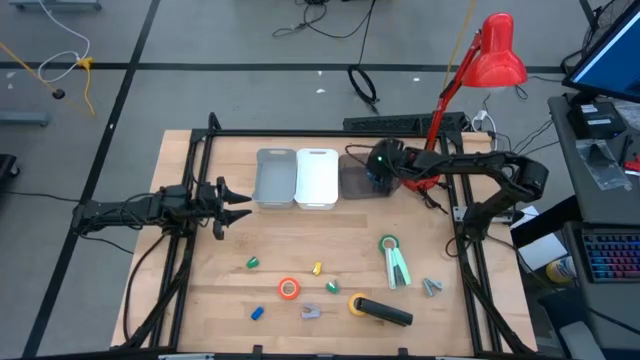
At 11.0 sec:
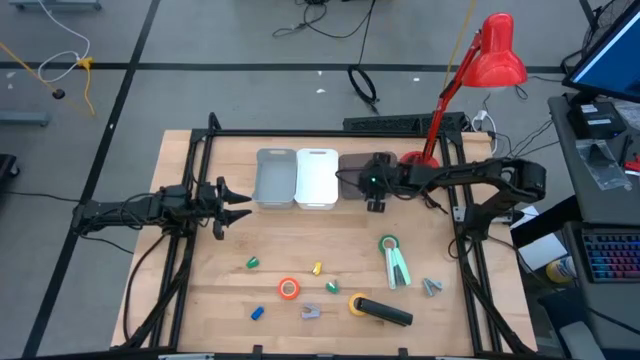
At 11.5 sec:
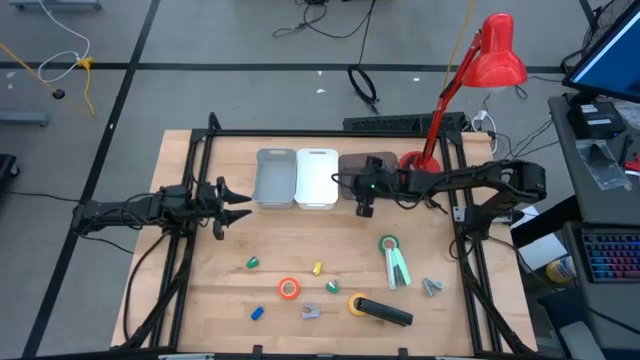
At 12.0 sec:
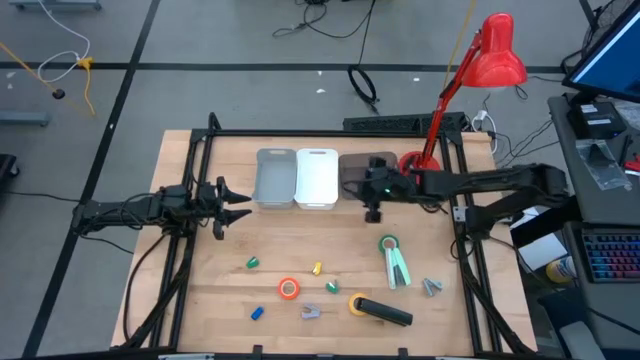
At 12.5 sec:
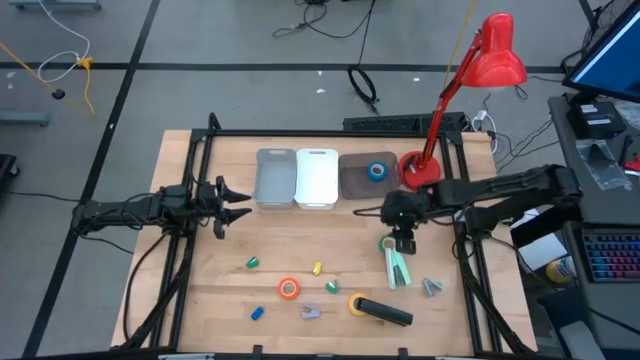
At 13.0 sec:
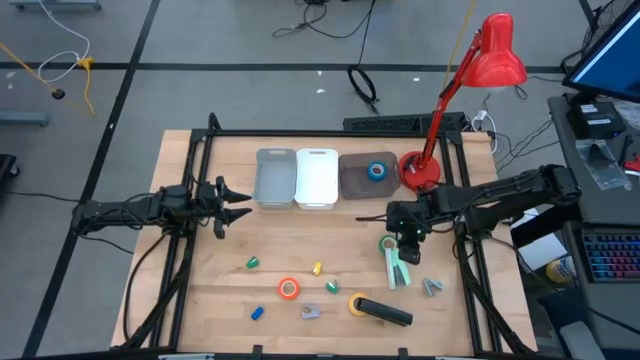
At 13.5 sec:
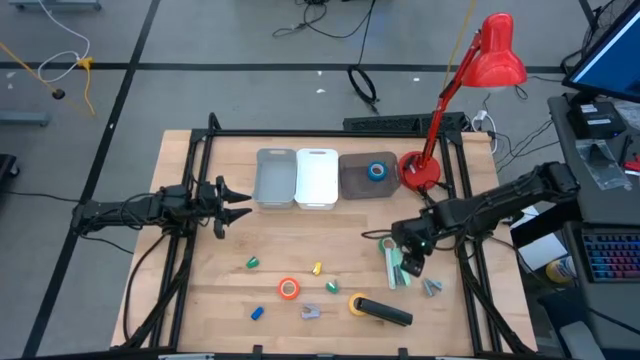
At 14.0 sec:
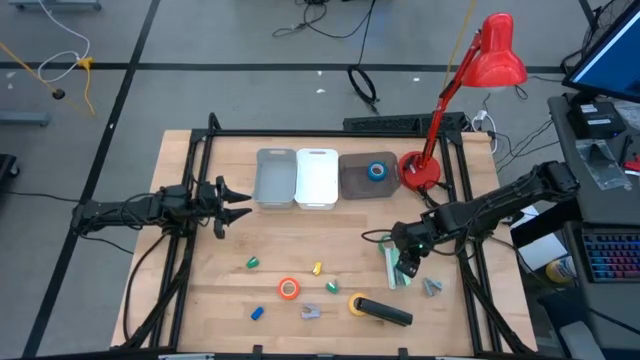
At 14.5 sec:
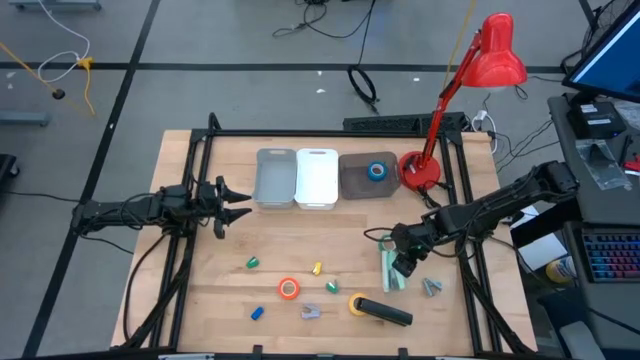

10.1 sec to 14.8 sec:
Task: Pick and place Stapler, Stapler remover, tape
Adjust the blue stapler on the table

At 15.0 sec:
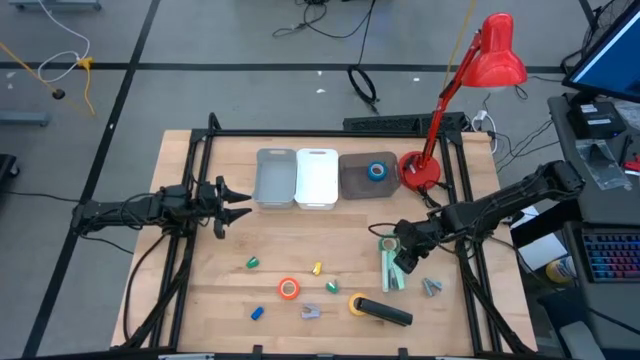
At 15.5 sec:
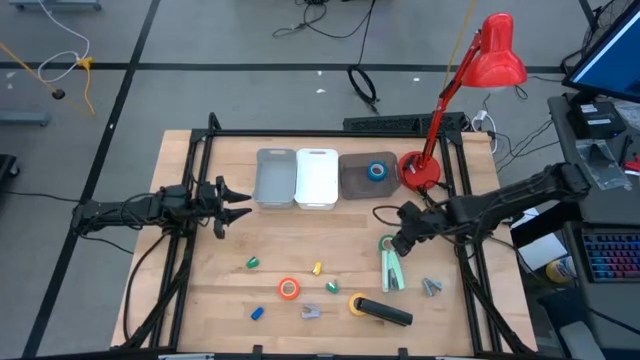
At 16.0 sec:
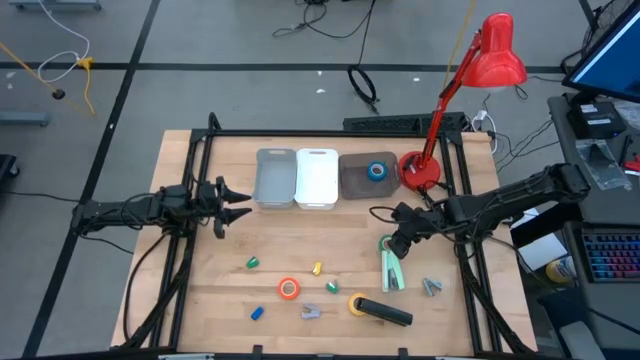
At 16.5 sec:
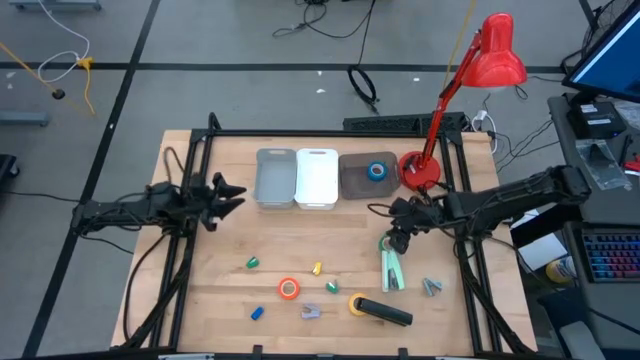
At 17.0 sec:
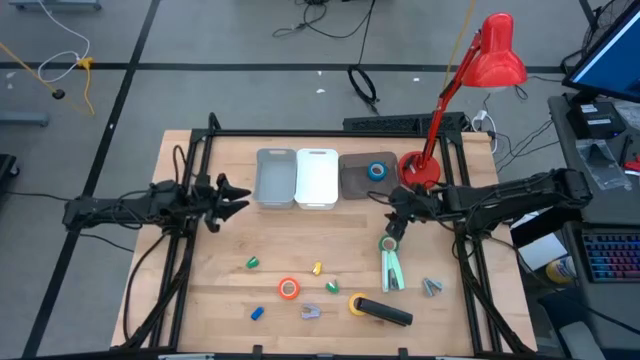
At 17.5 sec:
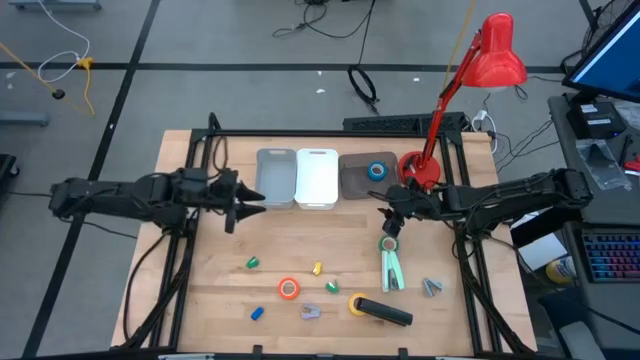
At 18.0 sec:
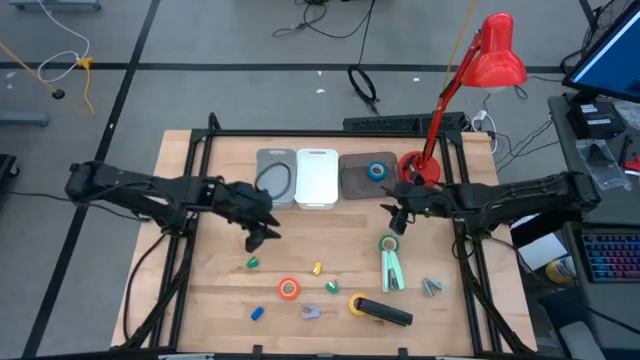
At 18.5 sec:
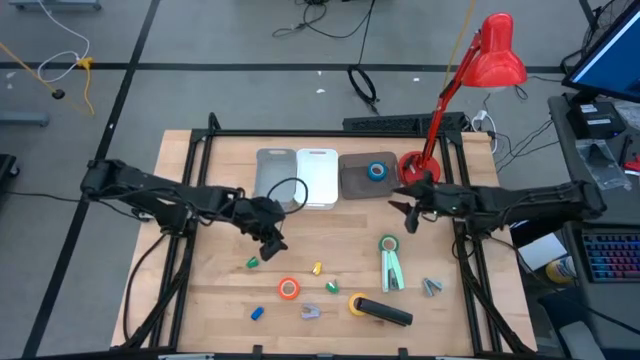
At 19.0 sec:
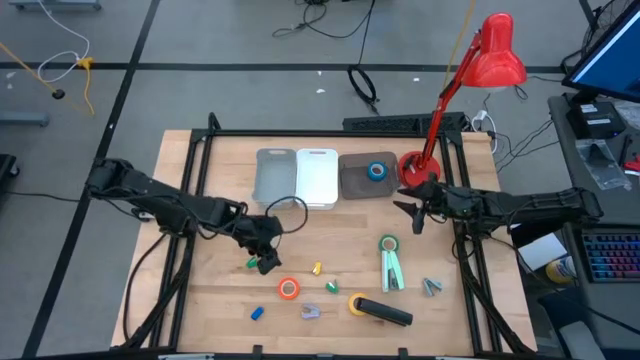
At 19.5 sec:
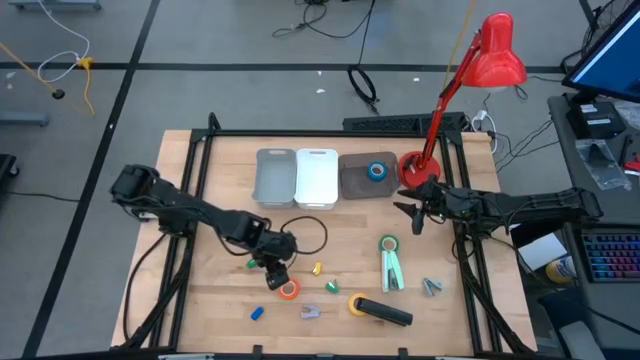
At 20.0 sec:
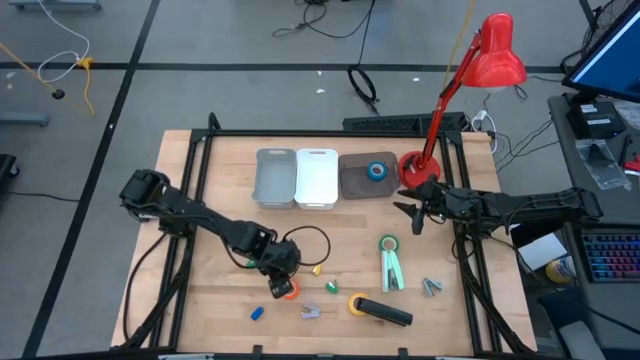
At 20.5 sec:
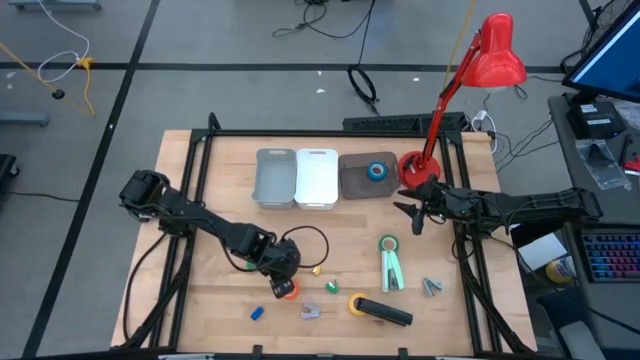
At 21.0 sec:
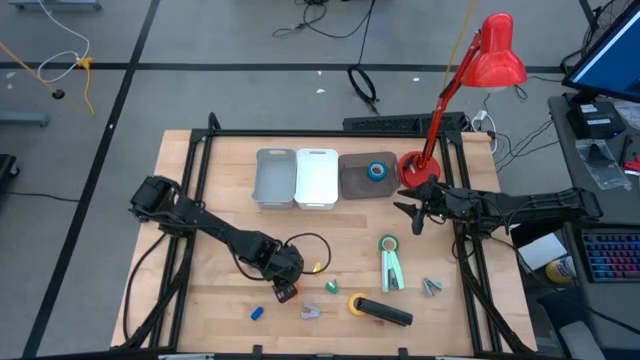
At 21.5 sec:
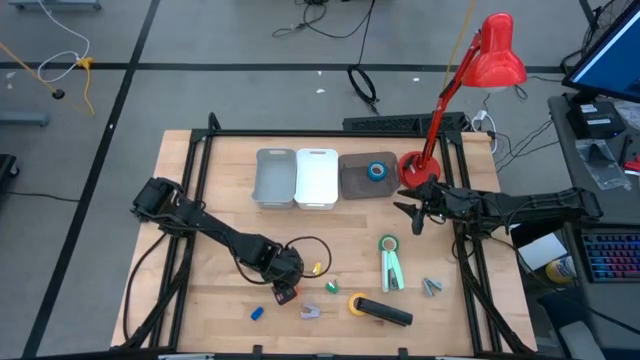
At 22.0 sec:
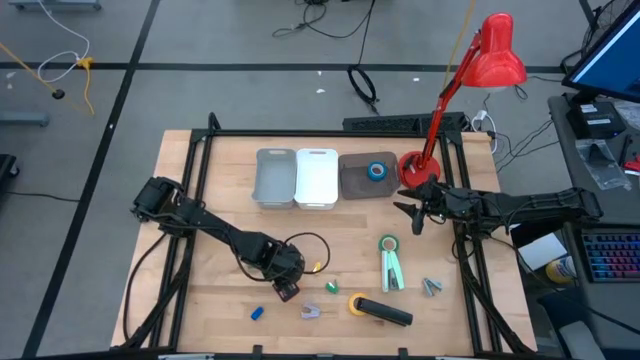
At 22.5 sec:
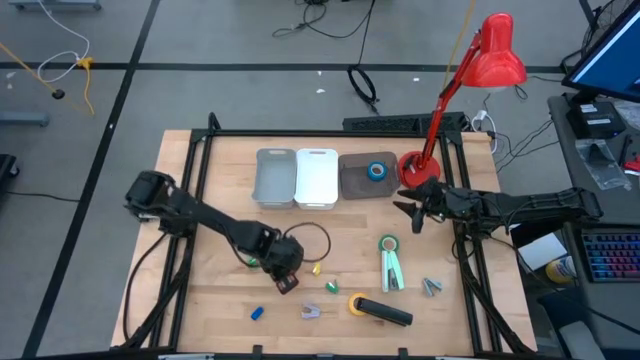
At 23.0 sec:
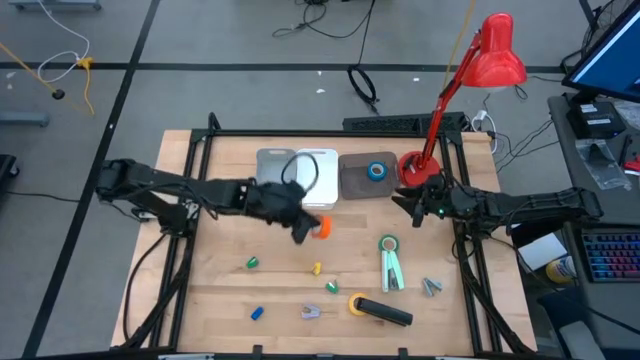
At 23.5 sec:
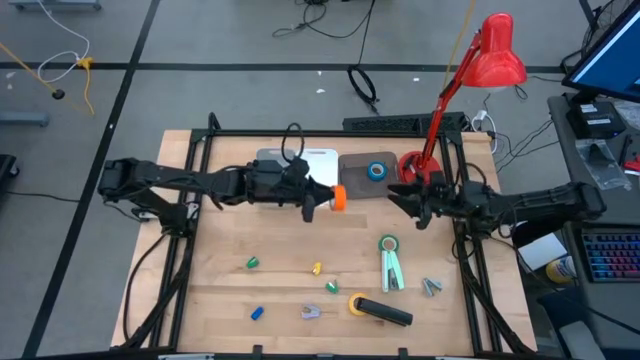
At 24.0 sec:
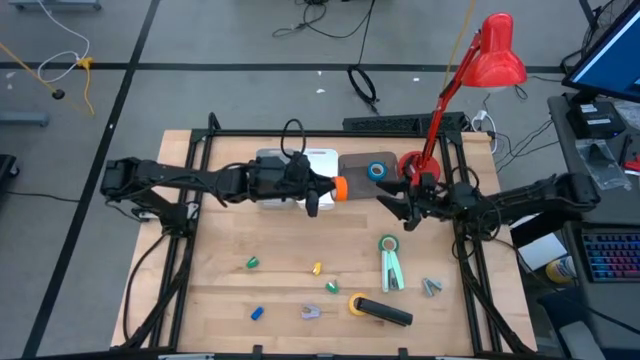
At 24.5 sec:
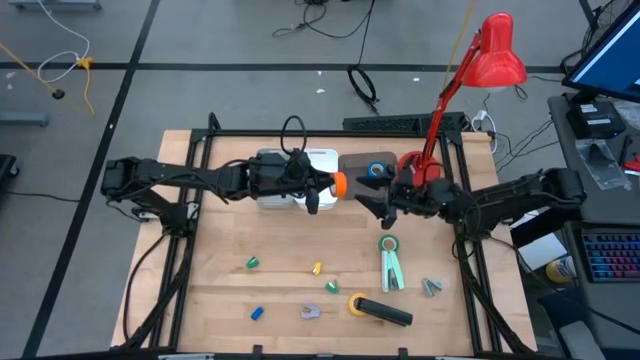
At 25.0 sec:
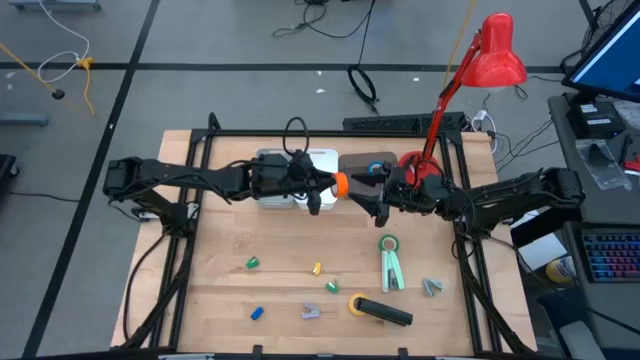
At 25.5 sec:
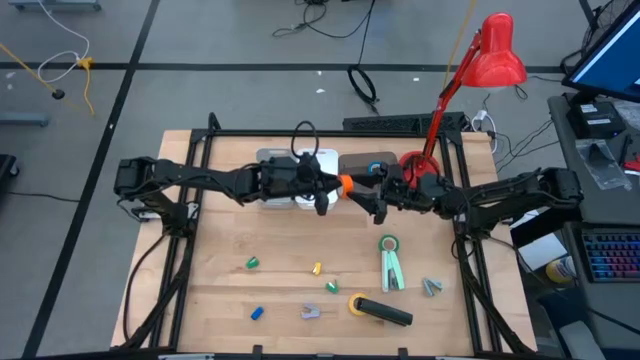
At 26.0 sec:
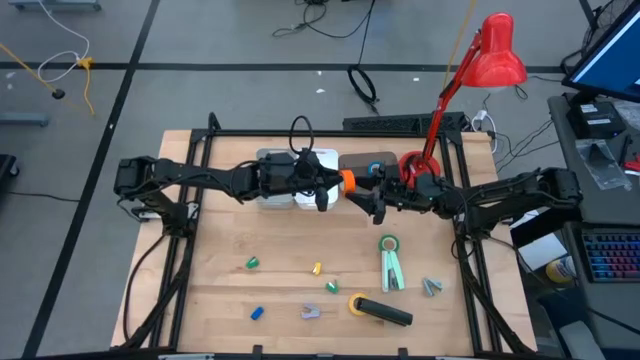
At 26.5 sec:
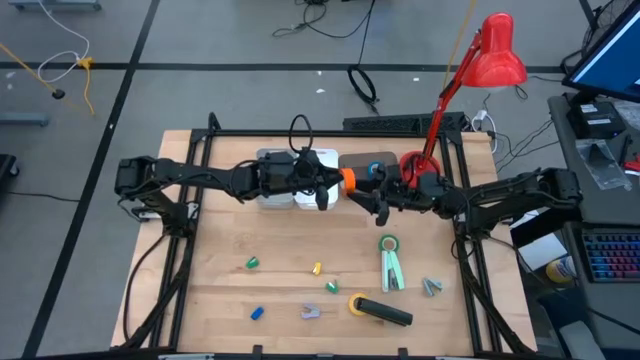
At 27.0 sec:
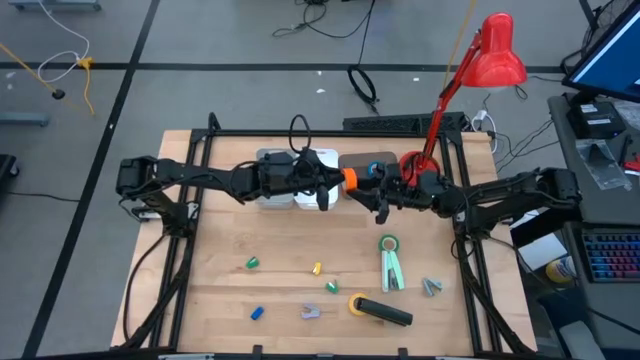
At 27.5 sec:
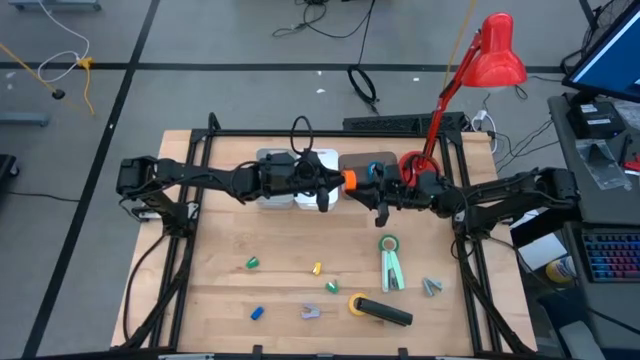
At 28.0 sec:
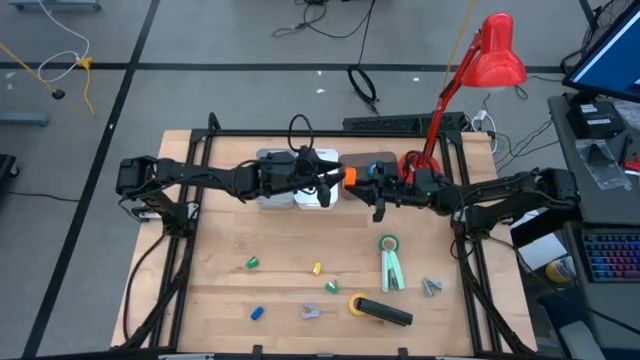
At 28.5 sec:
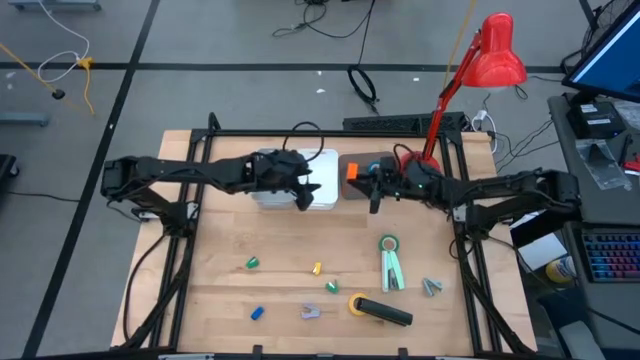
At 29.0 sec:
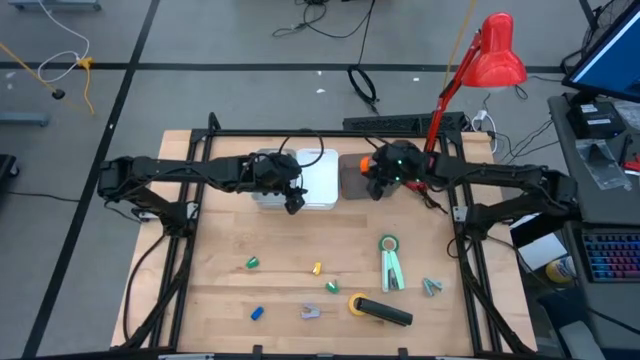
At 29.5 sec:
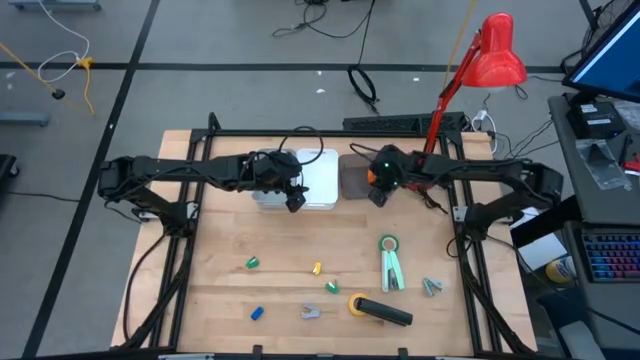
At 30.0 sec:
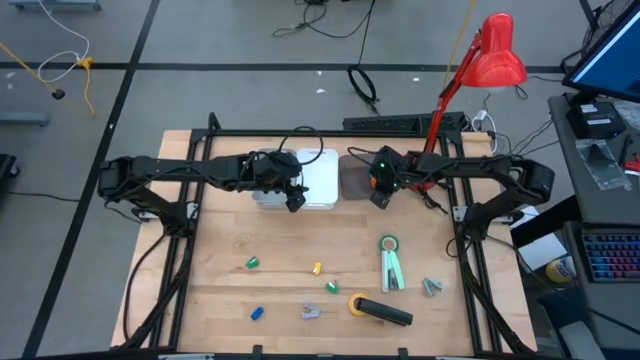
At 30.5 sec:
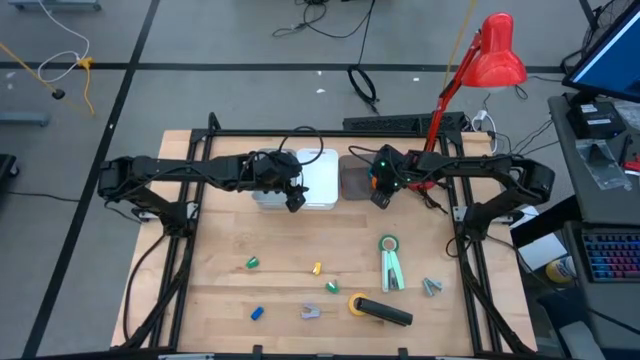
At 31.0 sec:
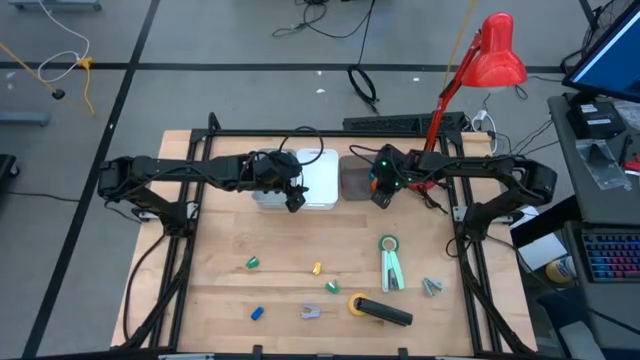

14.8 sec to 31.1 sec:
Put the orange tape into the black bin
